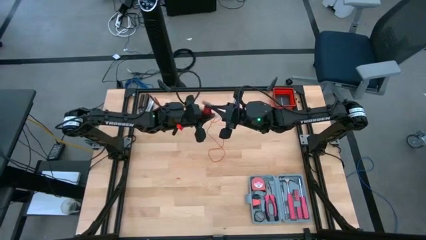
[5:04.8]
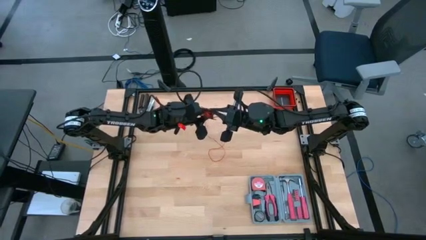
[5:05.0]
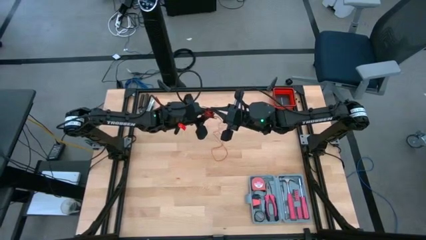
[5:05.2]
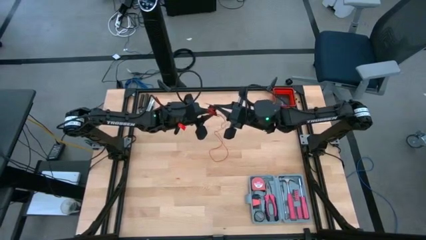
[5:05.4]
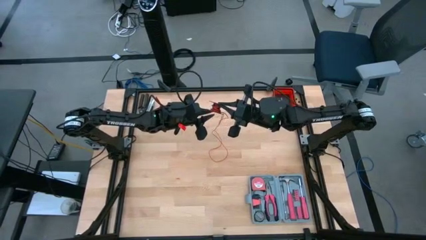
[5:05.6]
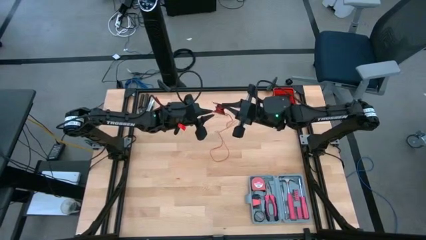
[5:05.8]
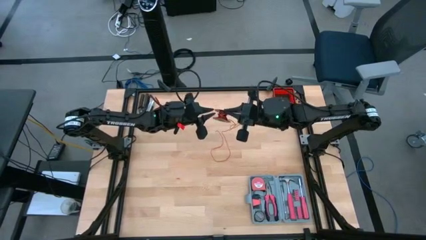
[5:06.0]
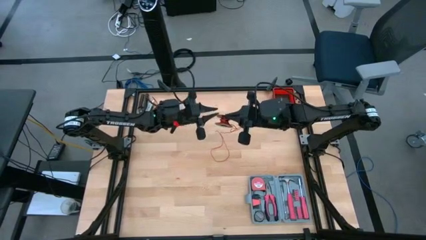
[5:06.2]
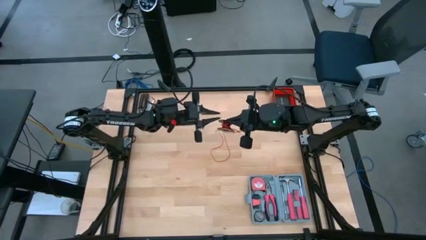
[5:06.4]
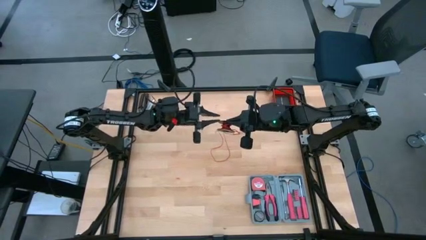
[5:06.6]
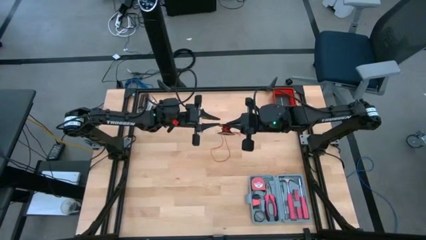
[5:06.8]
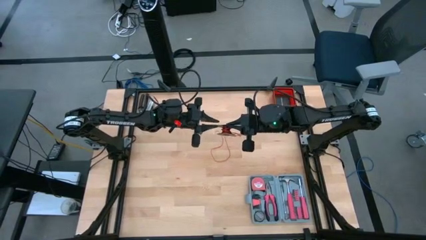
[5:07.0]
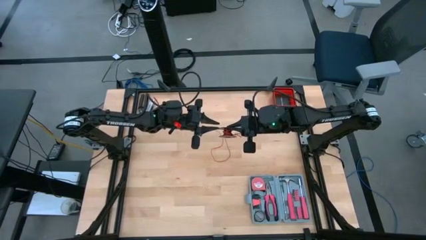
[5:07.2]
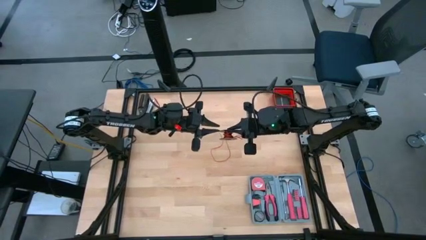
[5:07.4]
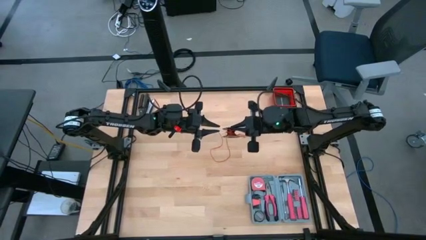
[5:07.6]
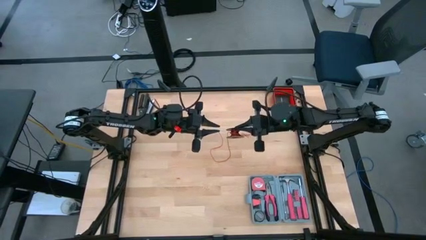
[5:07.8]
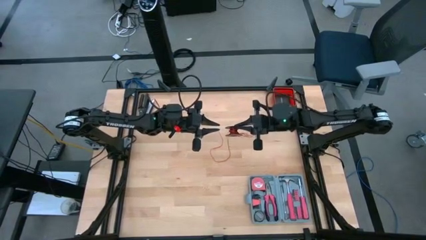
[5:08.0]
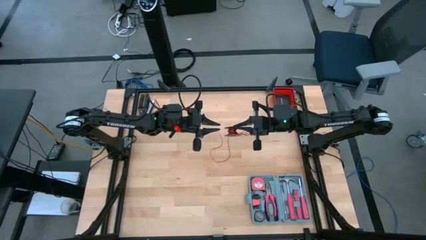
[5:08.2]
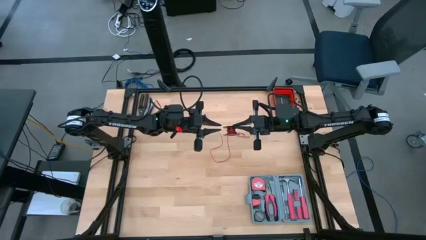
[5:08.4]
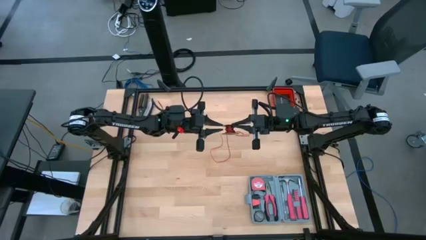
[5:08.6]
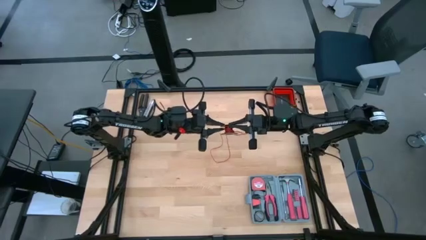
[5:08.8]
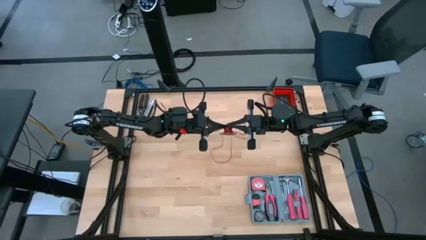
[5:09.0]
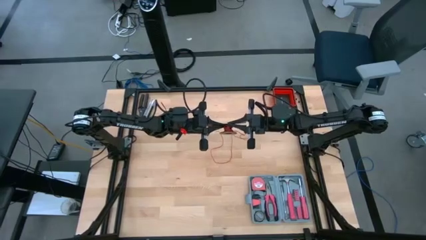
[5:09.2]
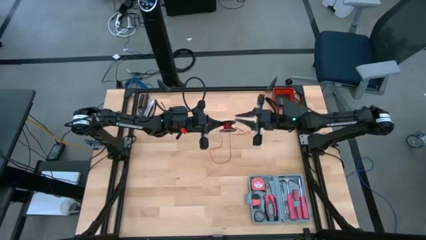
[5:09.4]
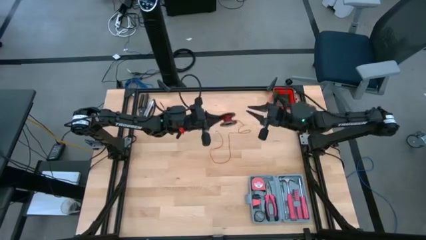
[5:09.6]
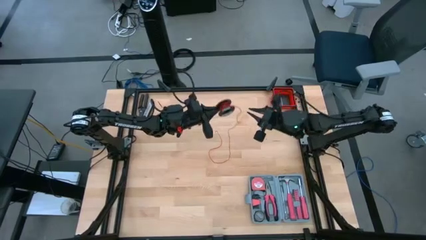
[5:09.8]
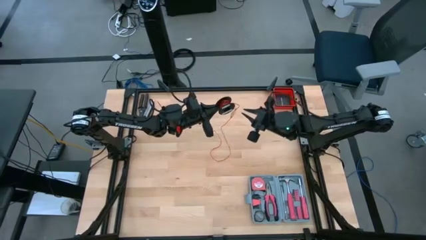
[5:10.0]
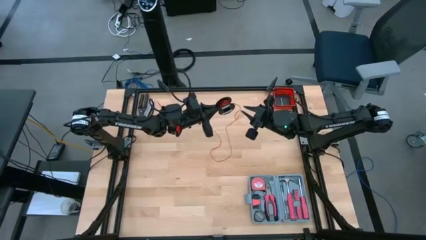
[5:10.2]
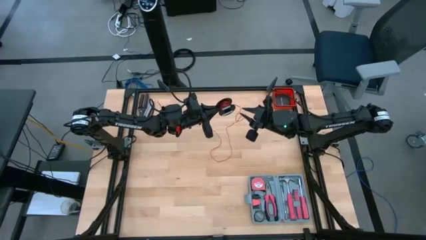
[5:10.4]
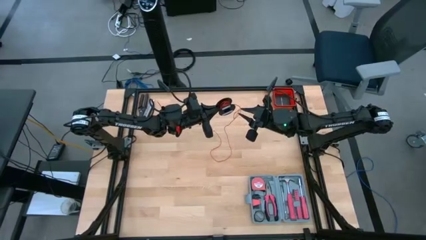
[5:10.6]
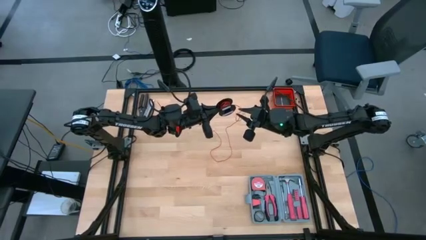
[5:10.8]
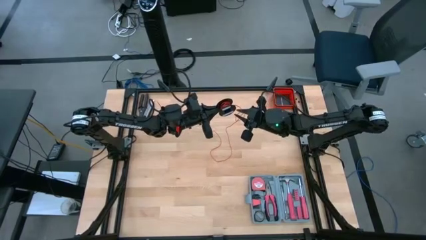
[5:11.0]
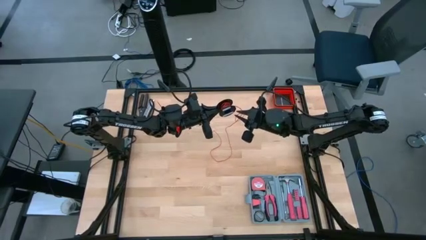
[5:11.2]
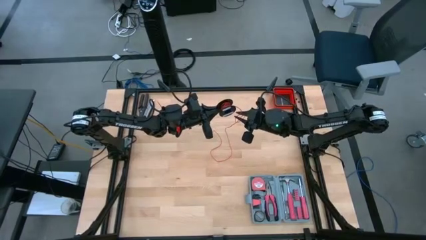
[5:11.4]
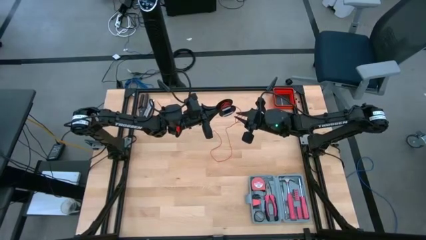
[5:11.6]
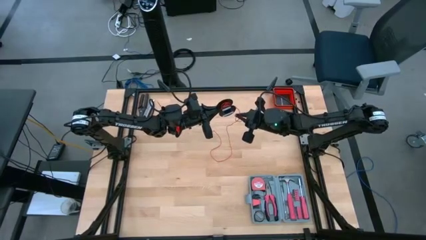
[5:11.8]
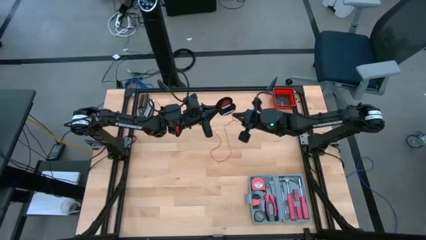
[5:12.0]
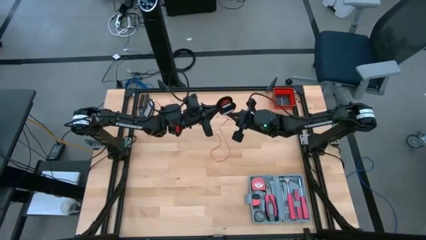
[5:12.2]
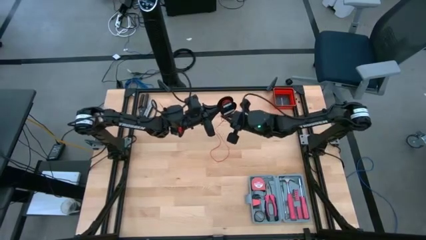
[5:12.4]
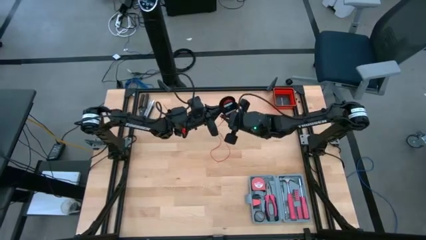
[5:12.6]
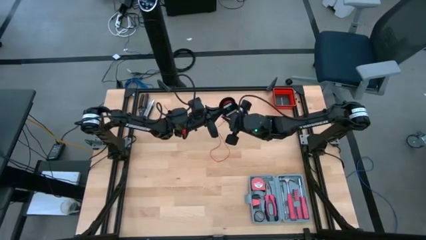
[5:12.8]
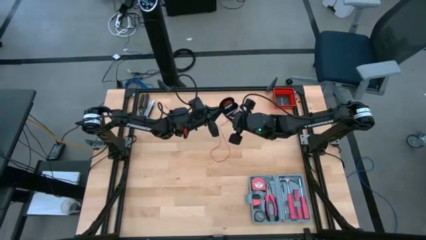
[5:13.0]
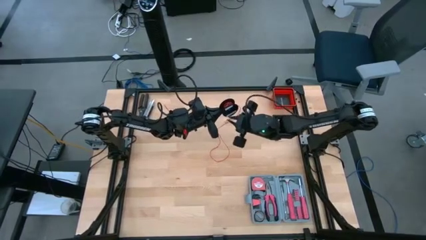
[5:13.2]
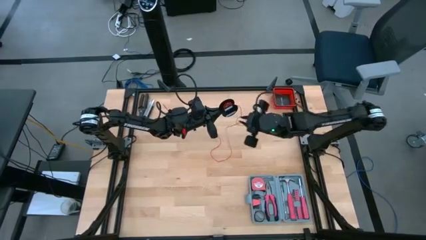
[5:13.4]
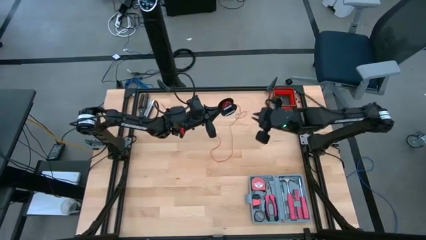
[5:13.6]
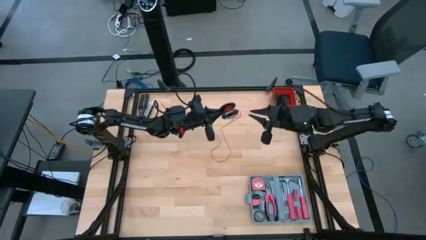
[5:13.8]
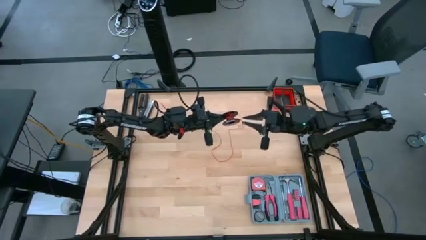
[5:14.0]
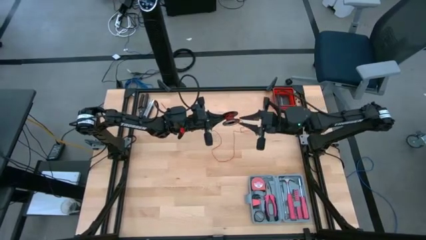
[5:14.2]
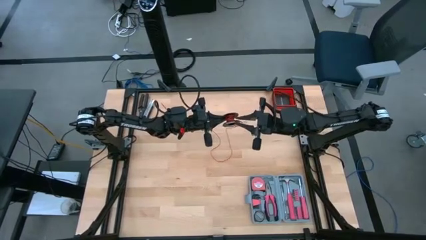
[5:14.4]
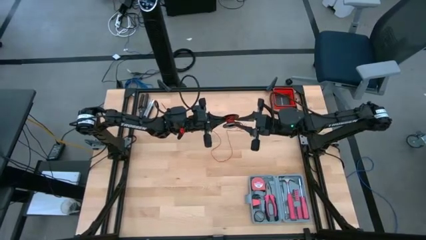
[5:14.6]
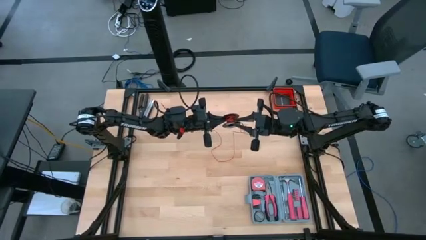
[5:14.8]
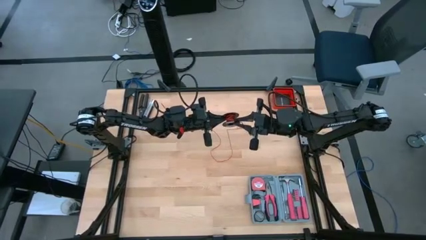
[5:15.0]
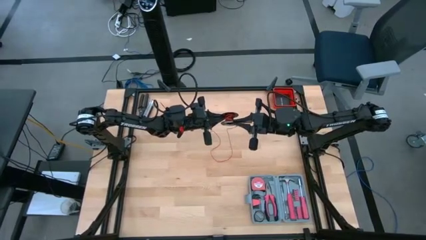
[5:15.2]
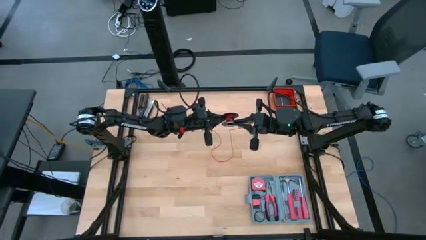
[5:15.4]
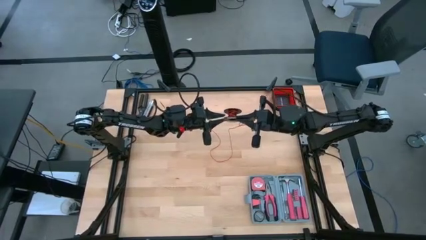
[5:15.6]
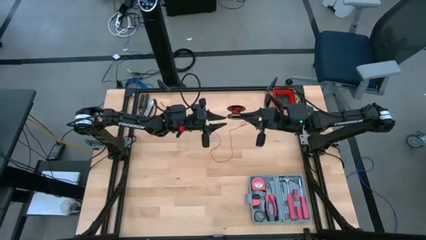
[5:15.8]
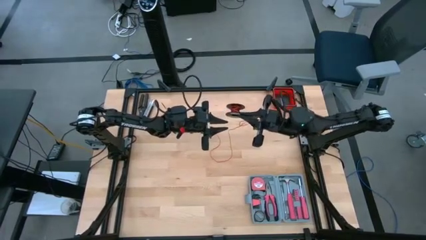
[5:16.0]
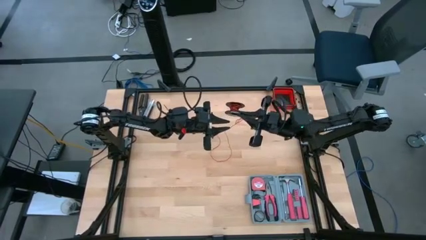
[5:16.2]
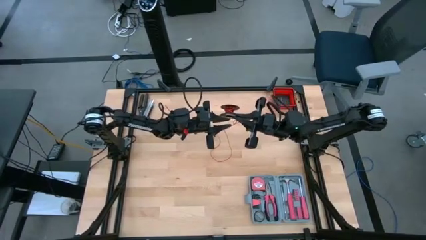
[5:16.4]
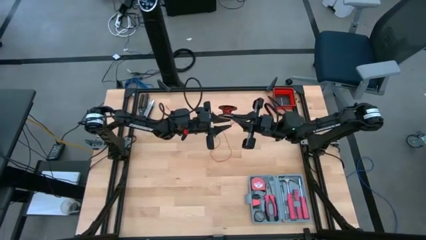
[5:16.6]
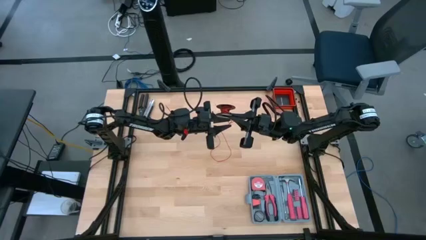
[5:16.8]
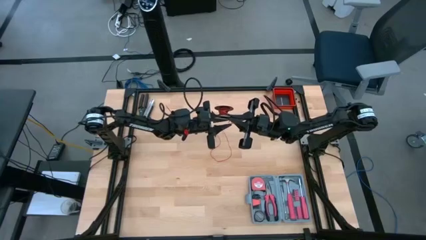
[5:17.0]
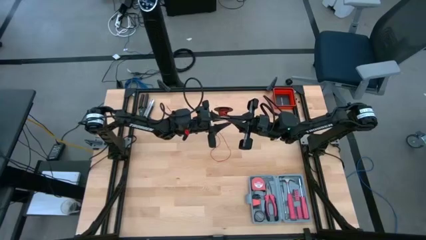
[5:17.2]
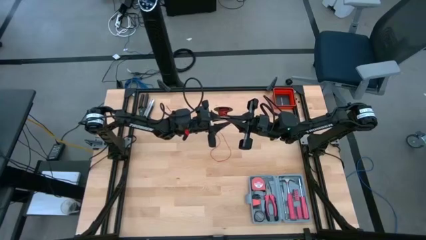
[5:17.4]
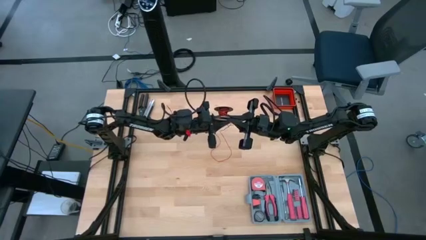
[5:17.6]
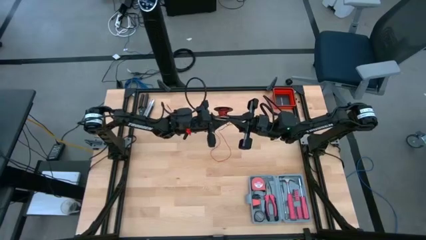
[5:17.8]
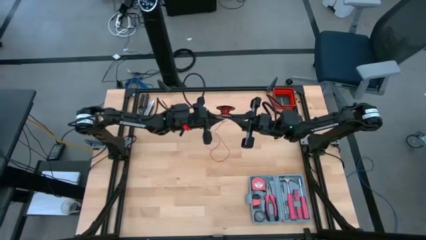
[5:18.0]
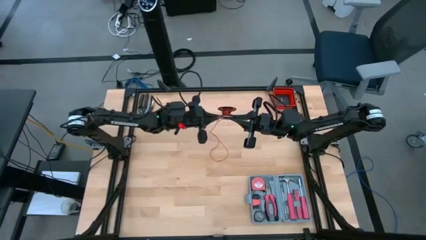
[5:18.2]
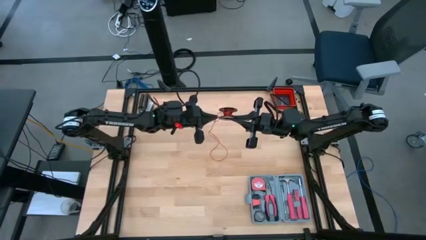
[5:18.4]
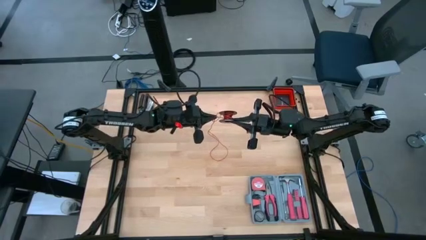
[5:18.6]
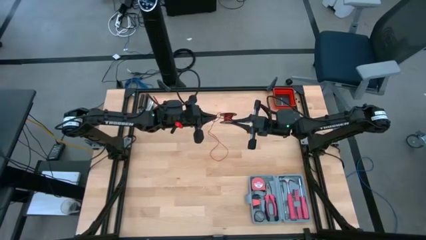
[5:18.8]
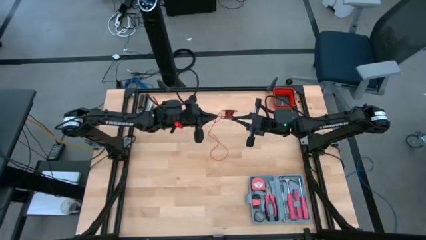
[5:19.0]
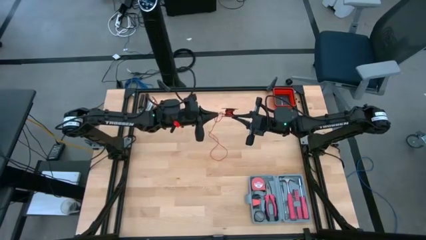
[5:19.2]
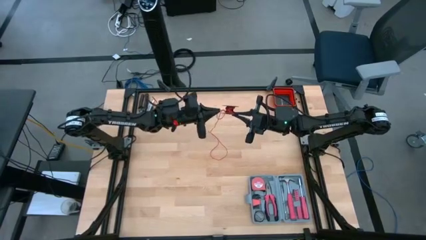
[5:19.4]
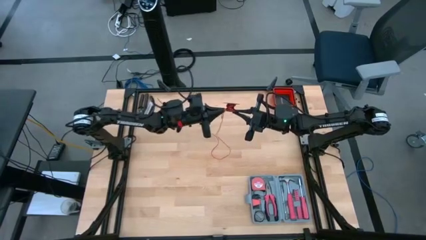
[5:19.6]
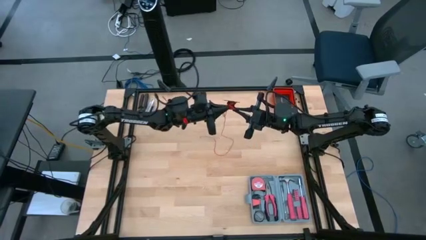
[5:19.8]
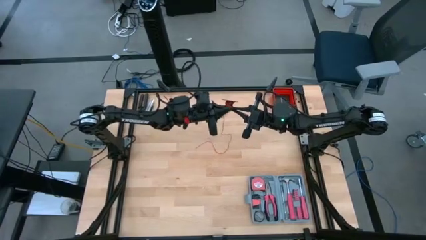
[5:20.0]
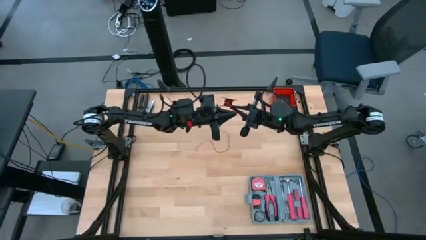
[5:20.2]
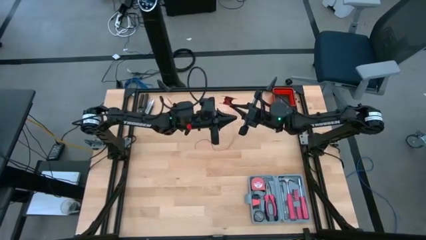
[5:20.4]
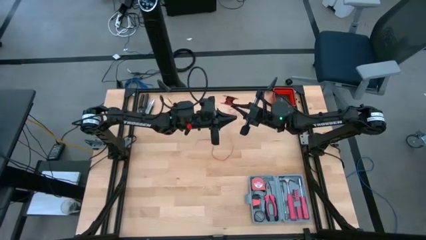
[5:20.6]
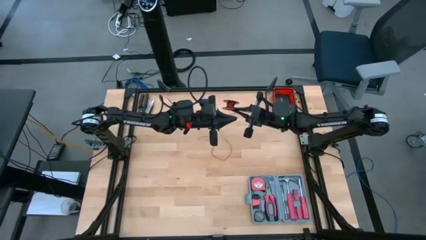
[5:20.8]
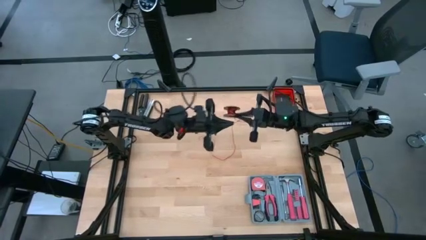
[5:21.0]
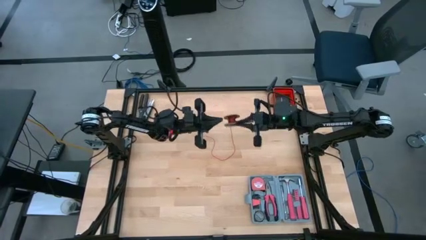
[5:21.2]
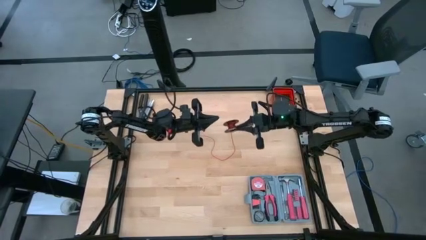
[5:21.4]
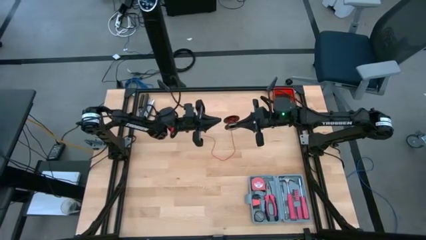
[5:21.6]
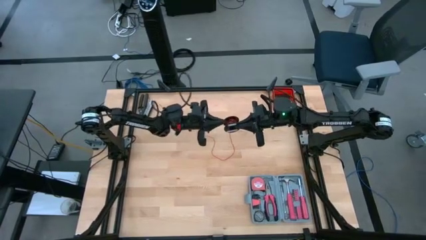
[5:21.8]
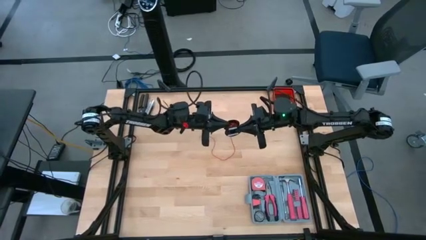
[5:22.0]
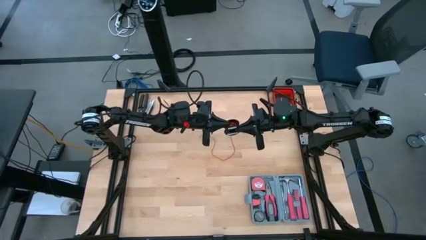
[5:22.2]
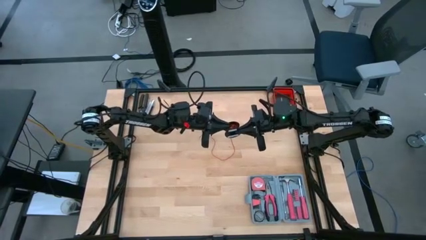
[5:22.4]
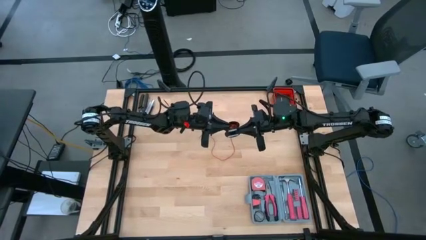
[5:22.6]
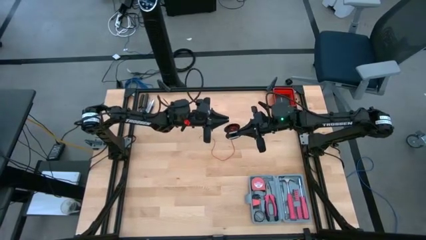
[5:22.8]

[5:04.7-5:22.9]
Task: Coil cords
Coil the wire
